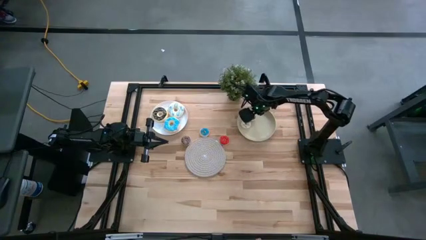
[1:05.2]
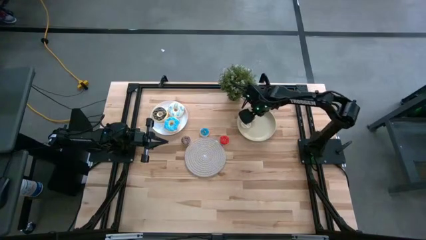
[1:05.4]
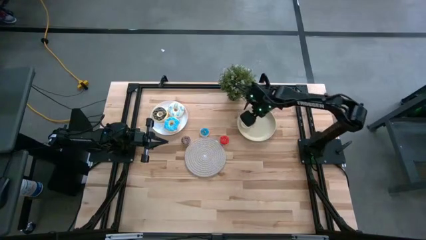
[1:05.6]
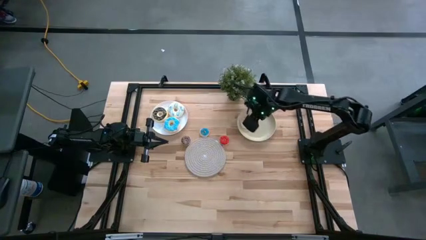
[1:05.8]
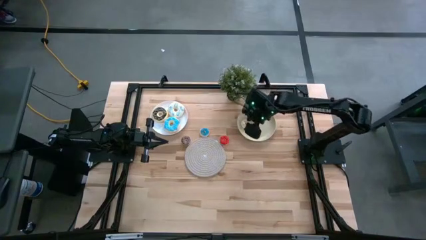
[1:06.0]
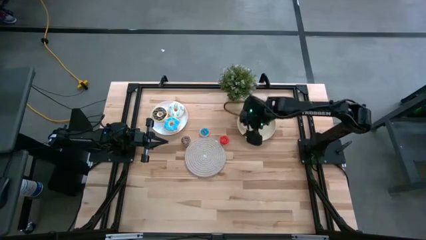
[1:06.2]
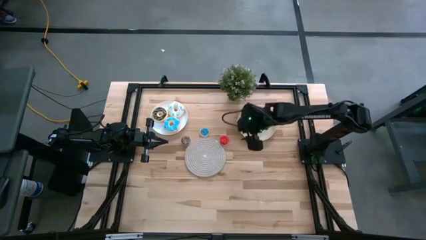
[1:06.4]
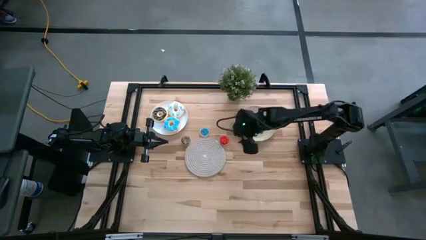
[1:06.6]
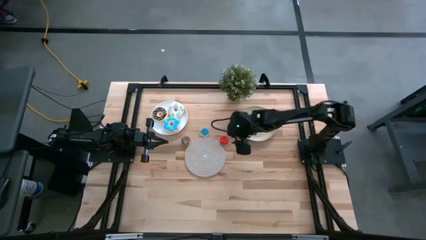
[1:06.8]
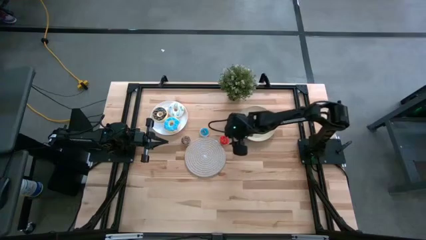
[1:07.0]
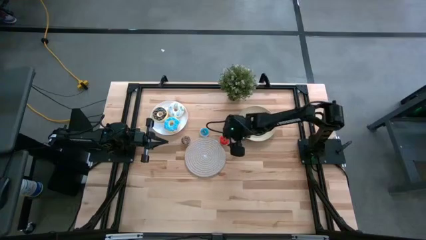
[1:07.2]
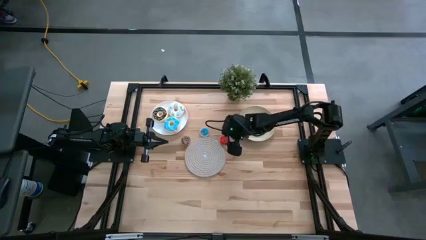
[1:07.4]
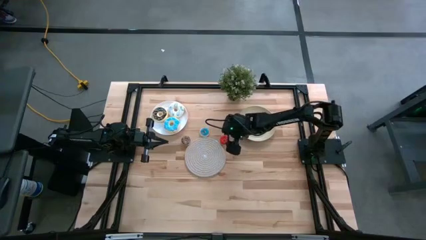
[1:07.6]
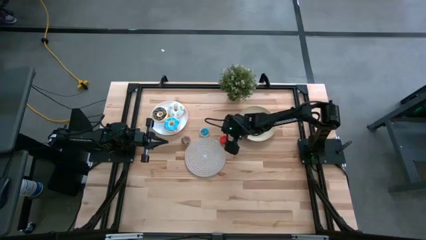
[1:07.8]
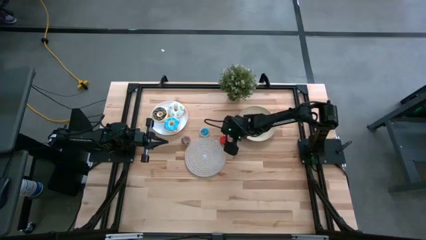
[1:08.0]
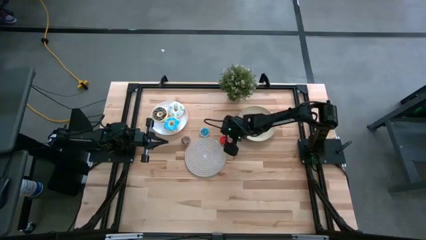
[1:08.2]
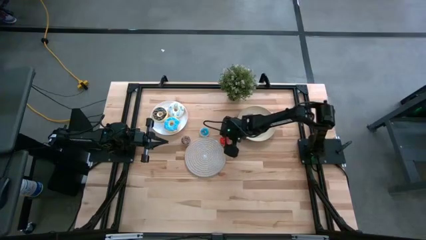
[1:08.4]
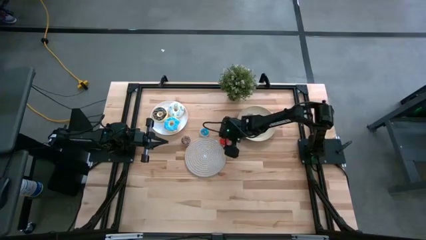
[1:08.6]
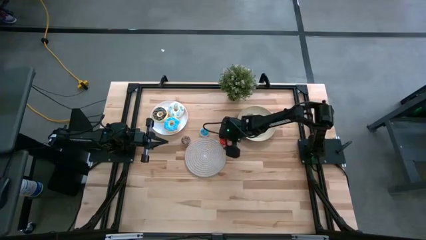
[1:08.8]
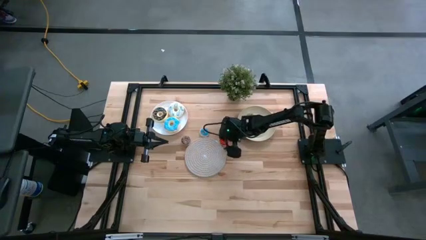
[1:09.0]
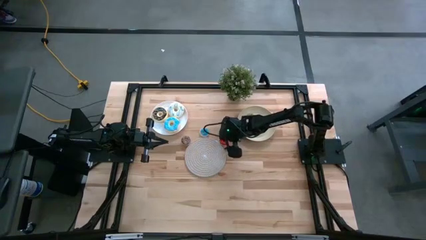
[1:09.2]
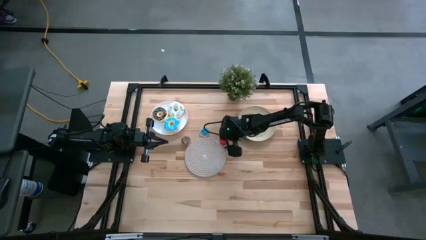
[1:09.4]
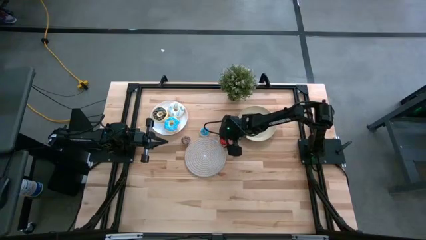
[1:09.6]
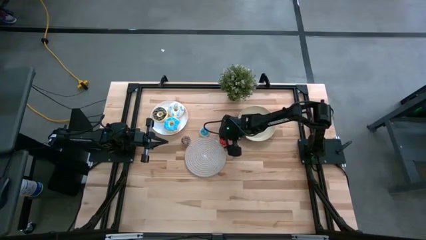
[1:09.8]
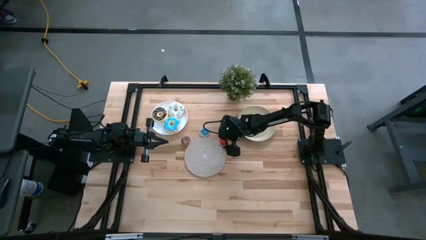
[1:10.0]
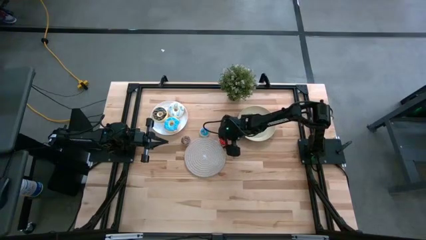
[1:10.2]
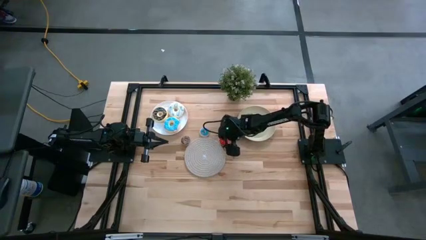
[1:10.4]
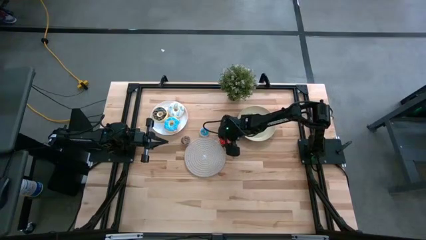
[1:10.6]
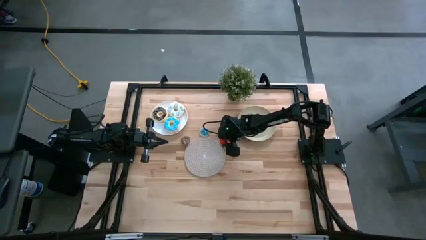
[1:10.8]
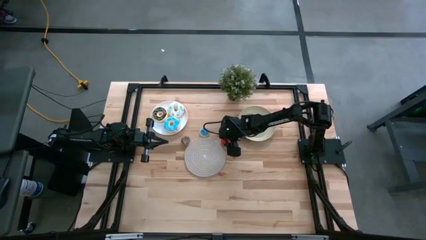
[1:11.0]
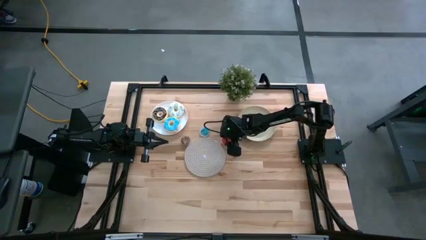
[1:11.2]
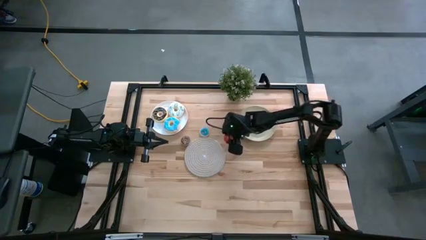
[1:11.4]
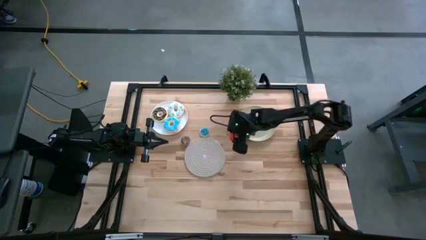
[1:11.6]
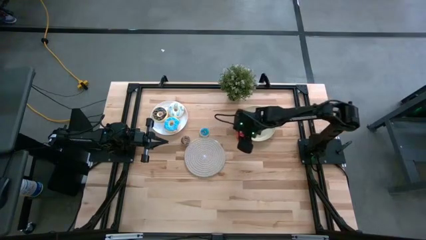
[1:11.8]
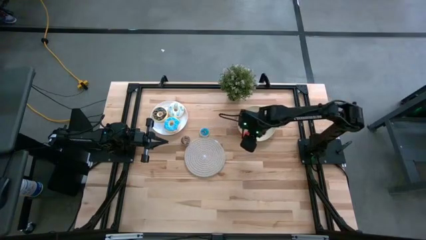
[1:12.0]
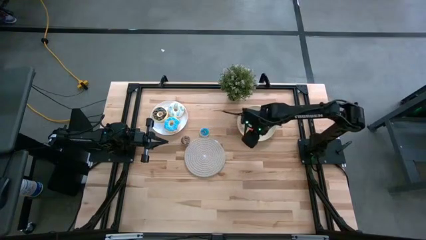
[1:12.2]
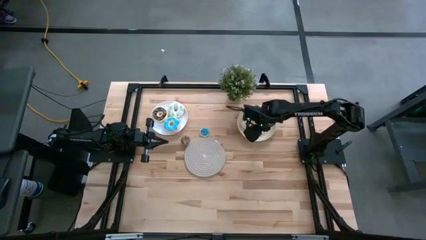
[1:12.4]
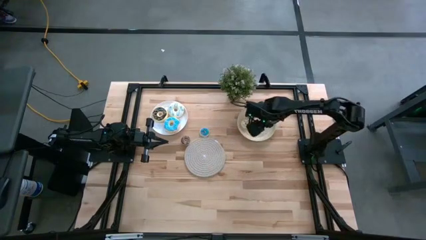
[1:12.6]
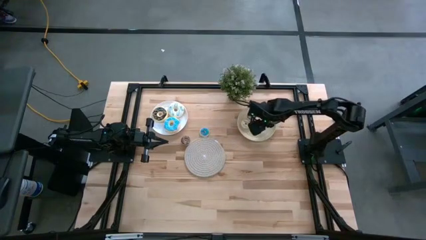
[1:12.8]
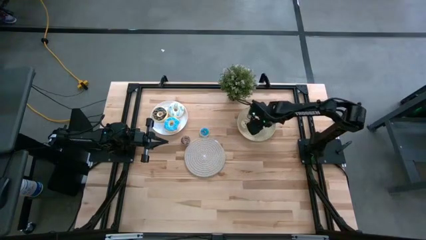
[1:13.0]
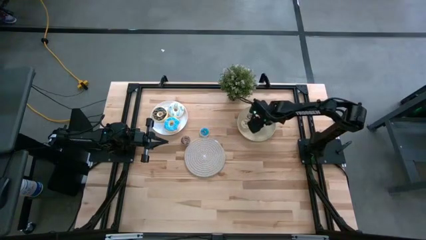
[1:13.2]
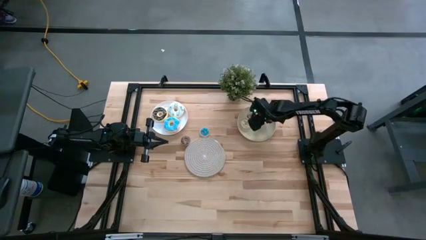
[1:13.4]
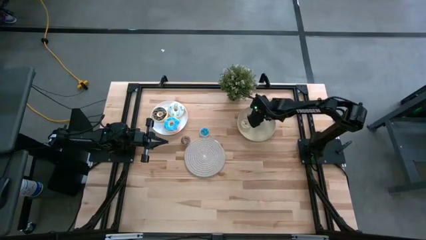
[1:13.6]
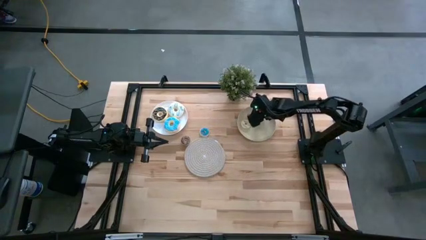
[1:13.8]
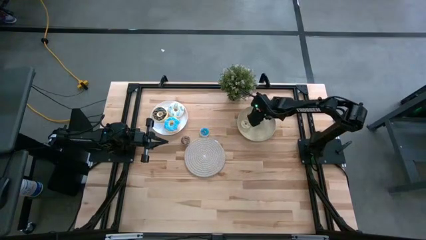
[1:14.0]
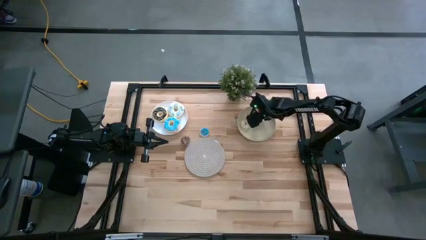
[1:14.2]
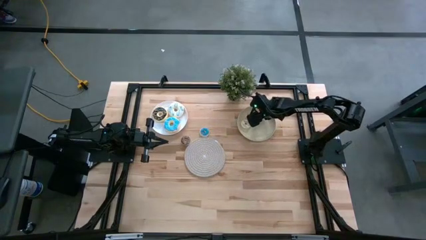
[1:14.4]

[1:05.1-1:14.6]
Task: Pick & Place donuts
Put the small red donut on the brown plate

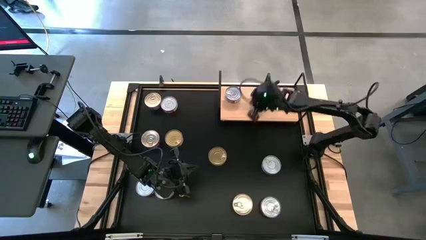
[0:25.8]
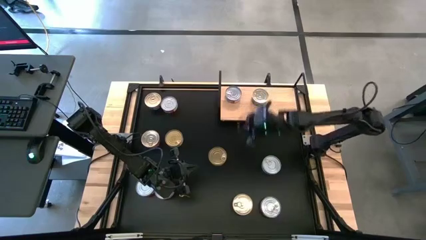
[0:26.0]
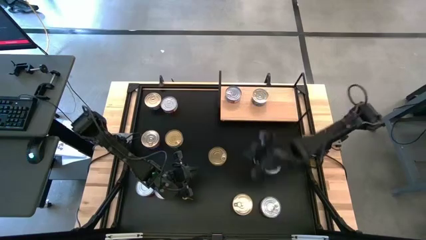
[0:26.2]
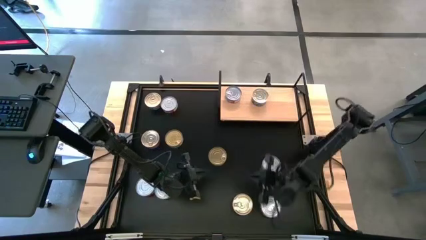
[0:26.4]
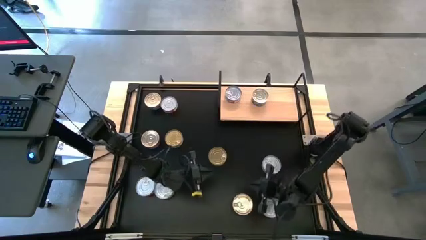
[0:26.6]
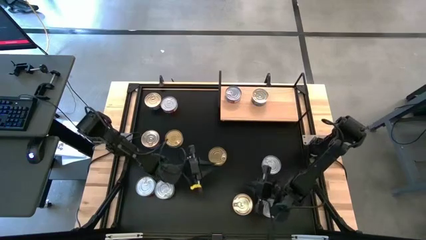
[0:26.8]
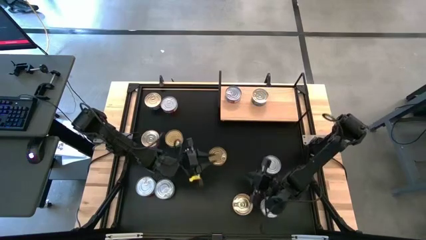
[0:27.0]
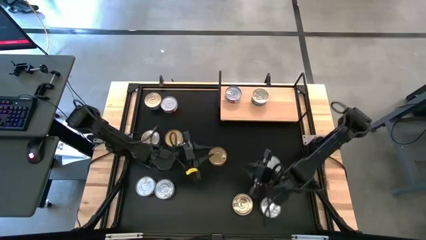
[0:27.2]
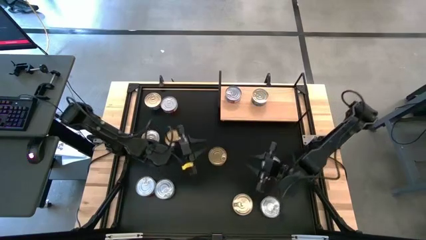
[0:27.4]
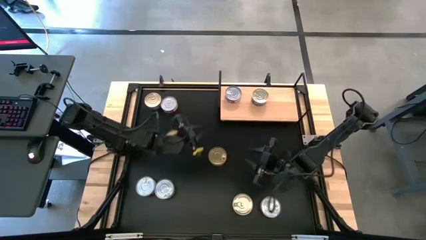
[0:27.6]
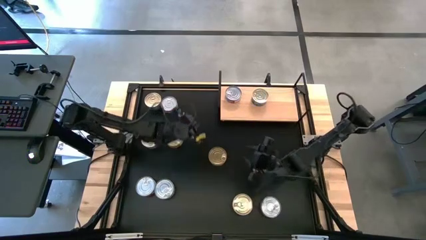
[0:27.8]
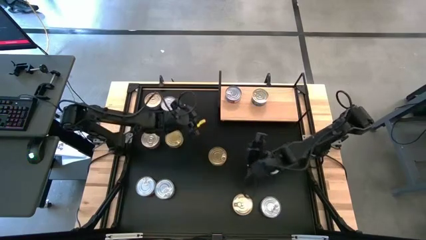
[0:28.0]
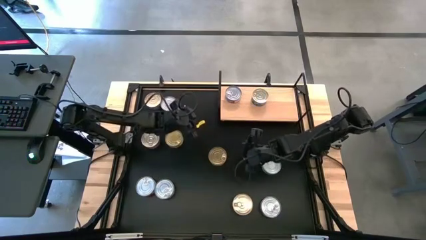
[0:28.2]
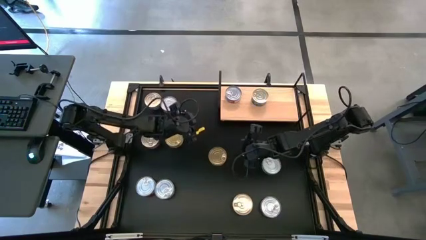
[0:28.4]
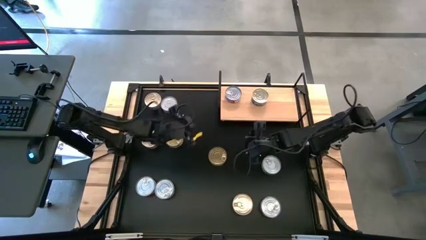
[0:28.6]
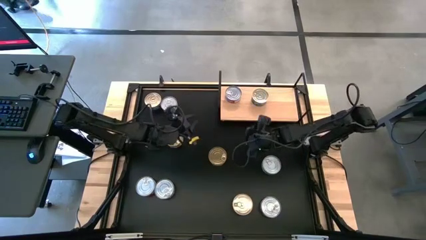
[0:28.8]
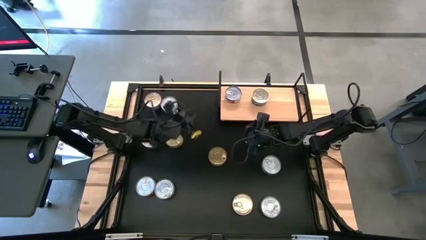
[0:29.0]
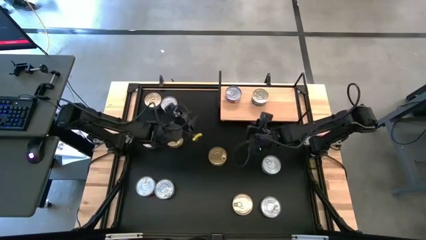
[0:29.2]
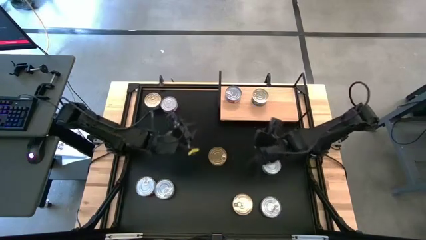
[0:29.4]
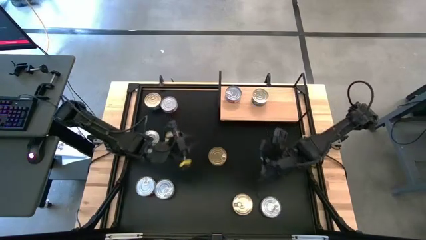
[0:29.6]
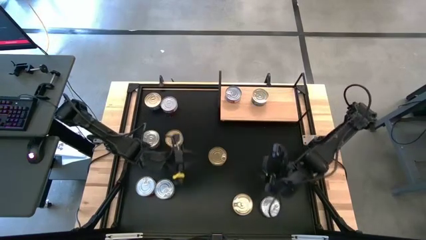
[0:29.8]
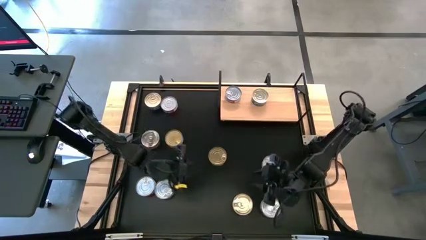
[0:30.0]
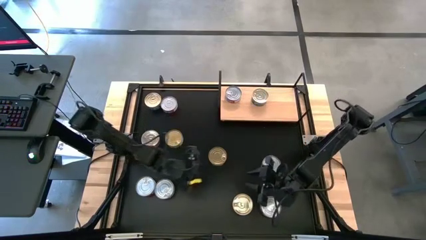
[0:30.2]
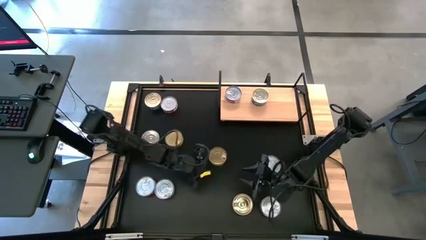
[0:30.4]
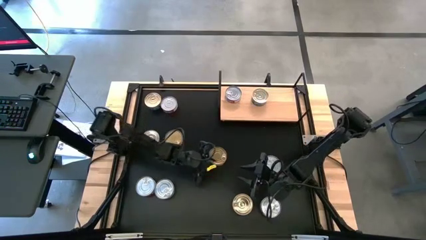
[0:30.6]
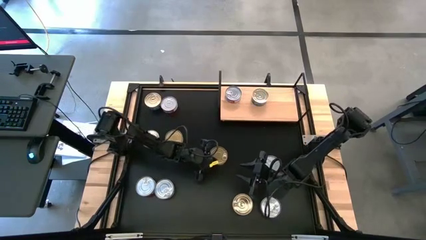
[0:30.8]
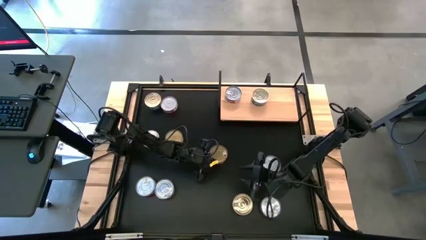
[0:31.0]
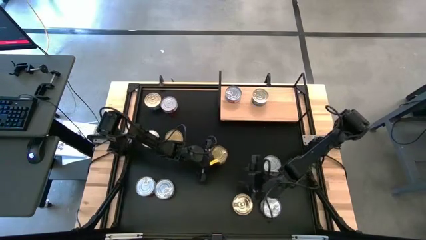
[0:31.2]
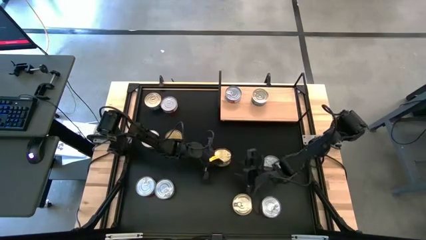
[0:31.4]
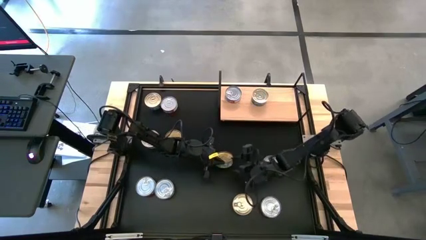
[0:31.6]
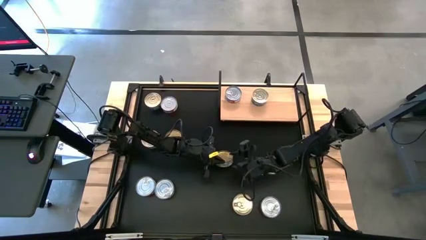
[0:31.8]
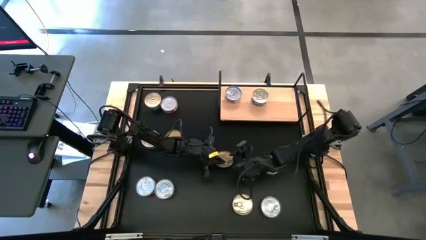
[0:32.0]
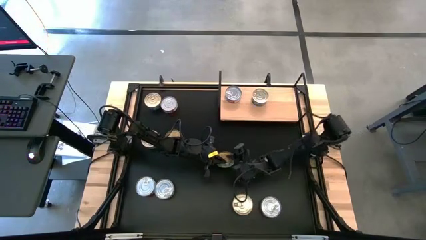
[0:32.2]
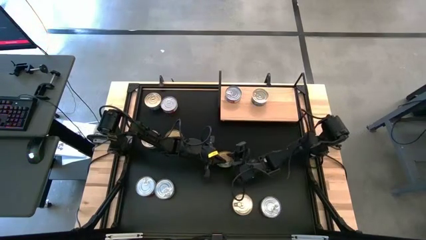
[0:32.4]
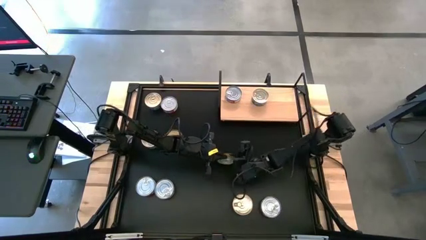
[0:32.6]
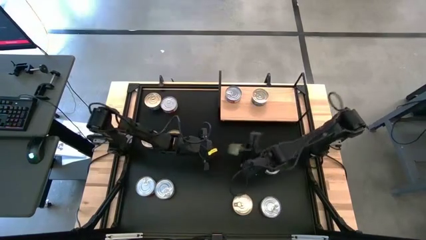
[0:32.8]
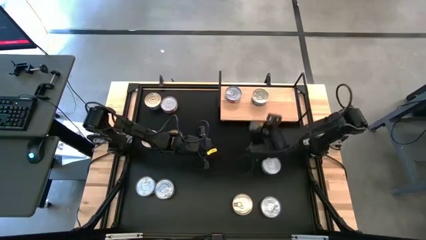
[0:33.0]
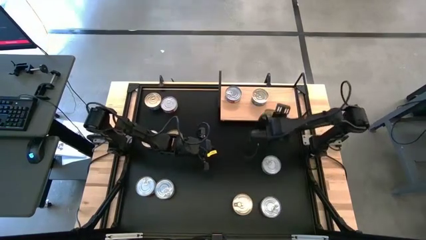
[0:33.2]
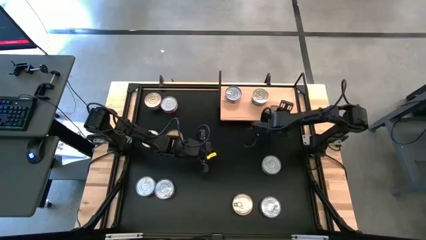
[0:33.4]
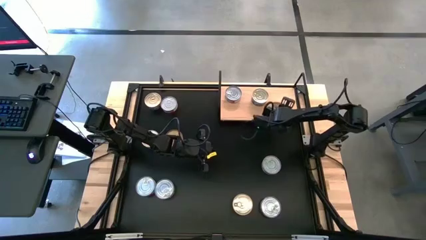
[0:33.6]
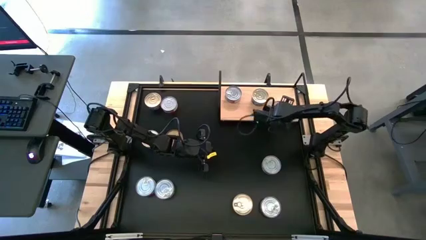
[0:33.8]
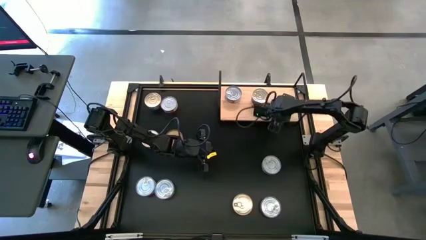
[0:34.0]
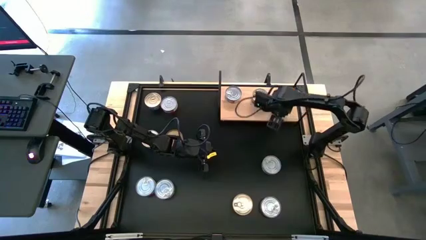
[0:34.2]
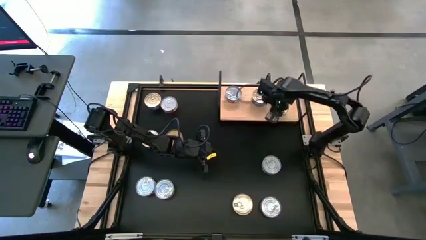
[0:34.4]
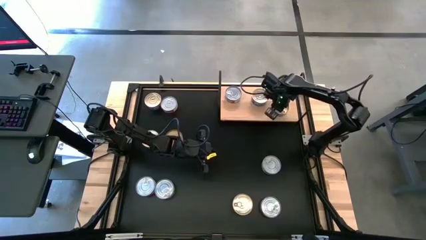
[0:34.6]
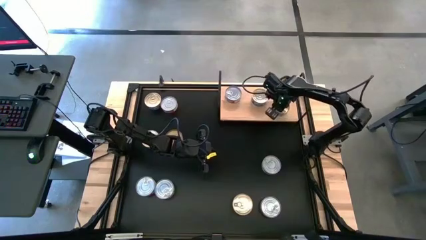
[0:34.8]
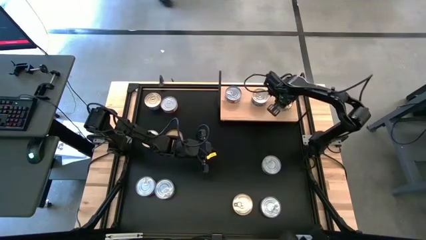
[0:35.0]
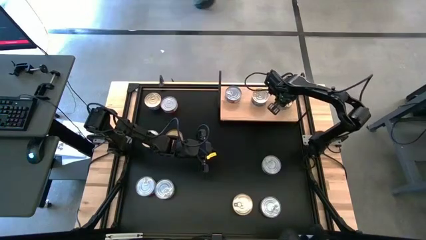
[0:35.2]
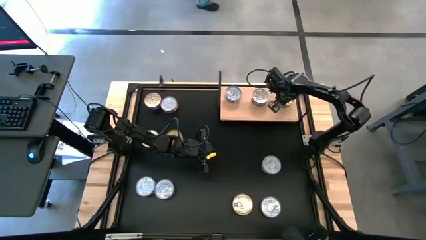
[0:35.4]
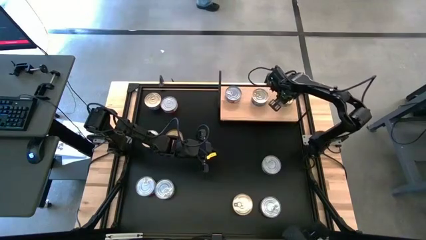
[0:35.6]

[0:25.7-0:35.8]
Task: Stack canned seafood by type on shelf
Put the green tuna can on the shelf
